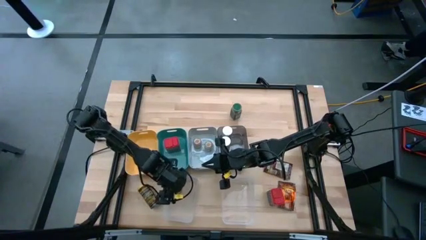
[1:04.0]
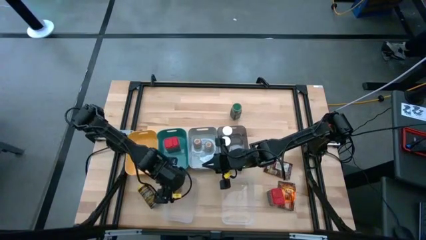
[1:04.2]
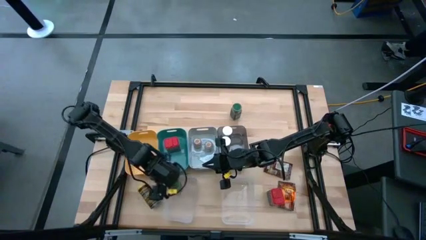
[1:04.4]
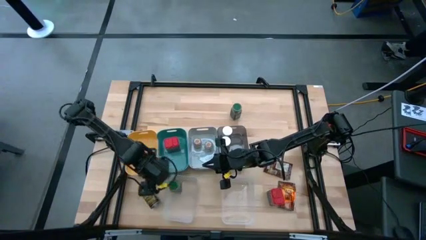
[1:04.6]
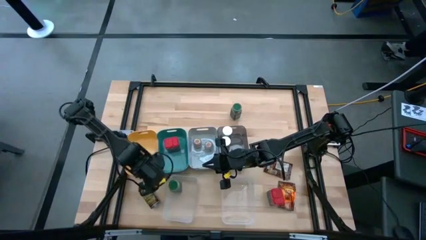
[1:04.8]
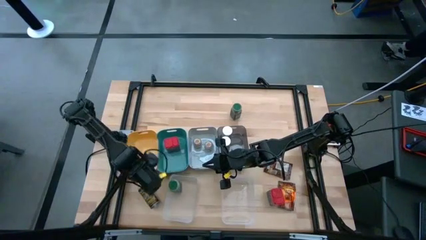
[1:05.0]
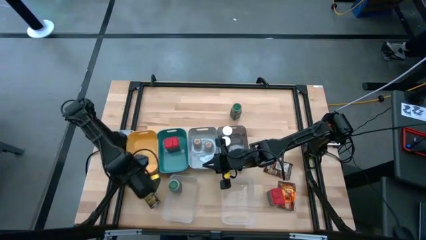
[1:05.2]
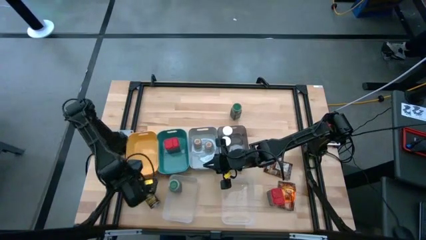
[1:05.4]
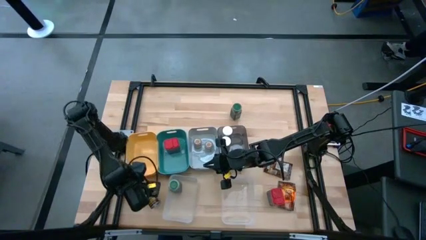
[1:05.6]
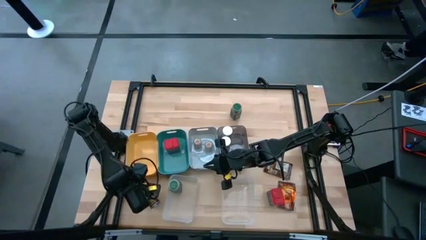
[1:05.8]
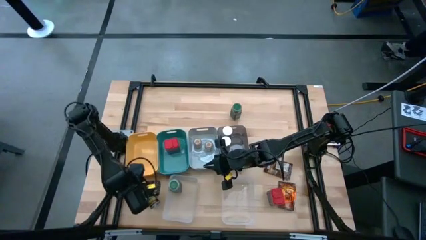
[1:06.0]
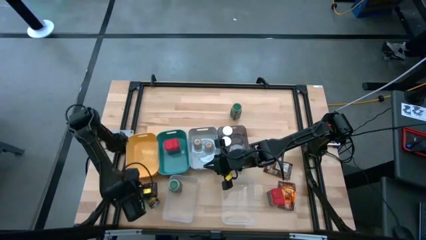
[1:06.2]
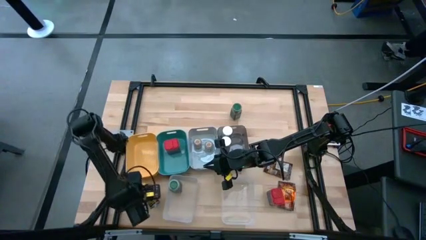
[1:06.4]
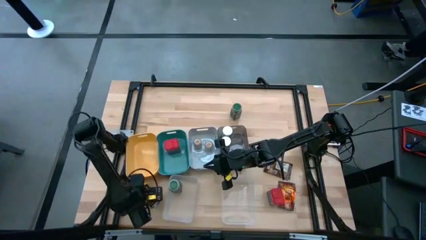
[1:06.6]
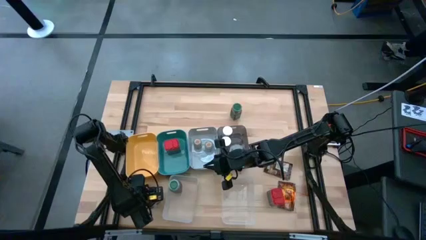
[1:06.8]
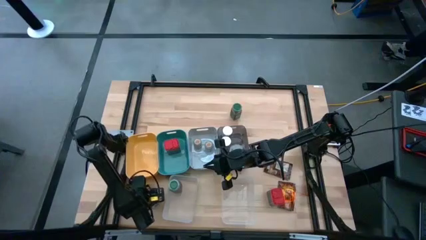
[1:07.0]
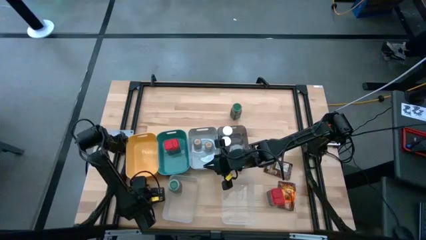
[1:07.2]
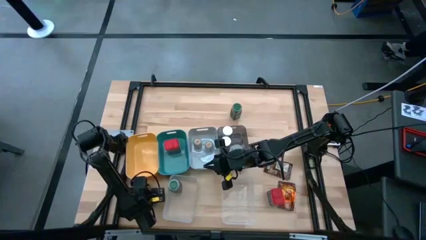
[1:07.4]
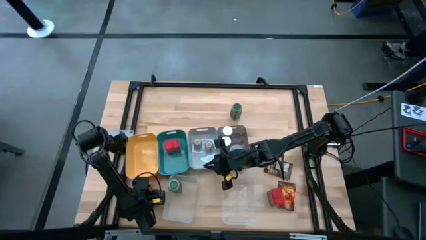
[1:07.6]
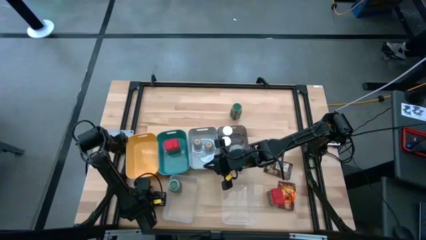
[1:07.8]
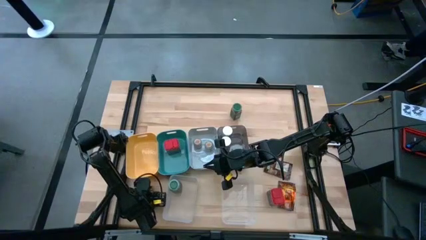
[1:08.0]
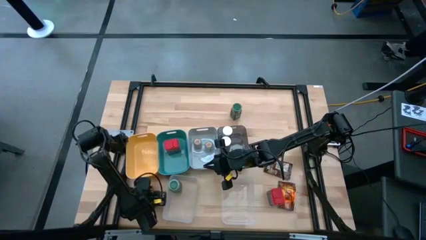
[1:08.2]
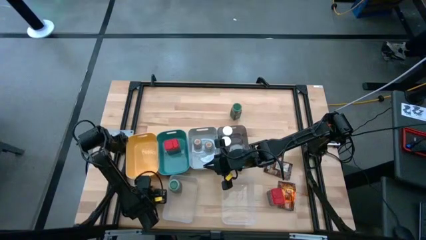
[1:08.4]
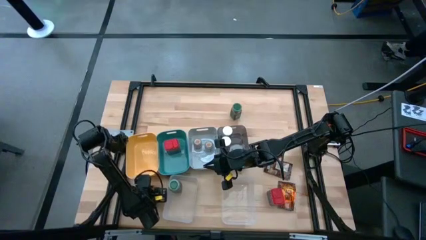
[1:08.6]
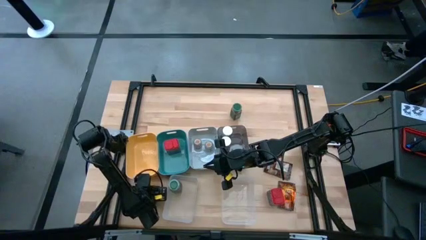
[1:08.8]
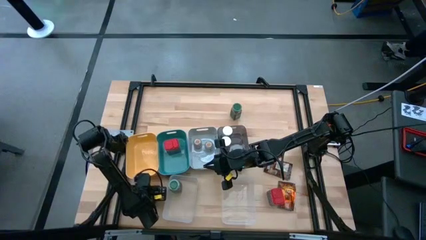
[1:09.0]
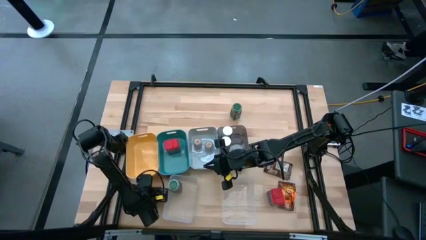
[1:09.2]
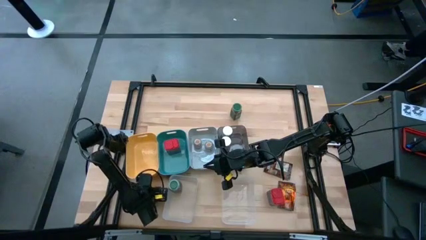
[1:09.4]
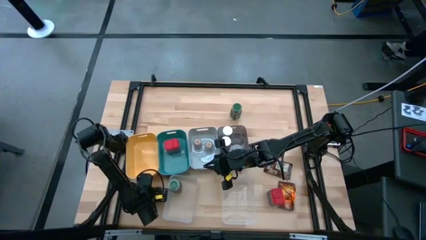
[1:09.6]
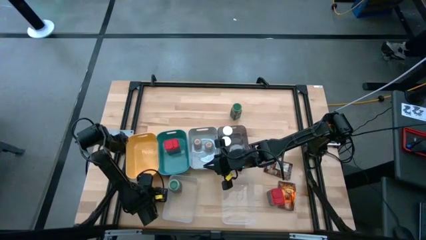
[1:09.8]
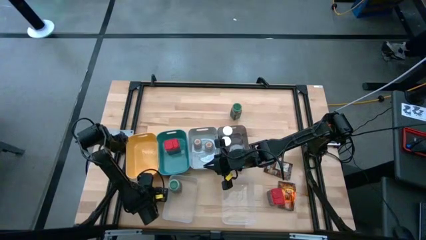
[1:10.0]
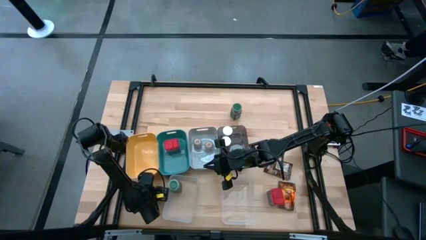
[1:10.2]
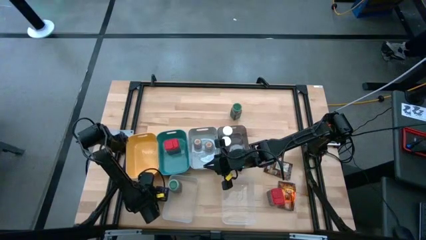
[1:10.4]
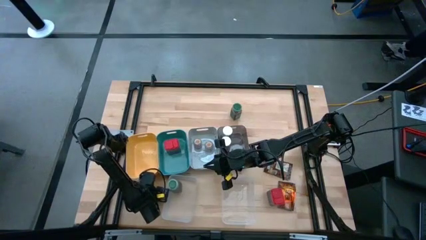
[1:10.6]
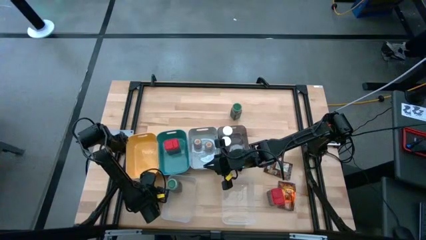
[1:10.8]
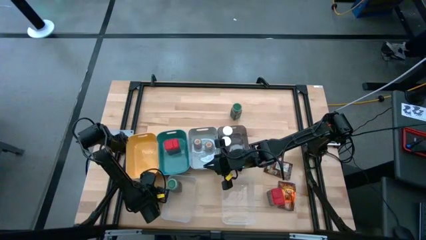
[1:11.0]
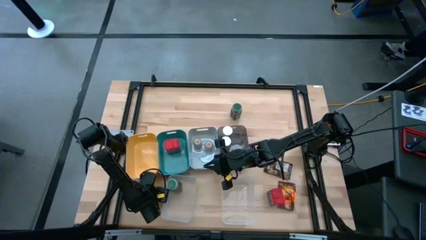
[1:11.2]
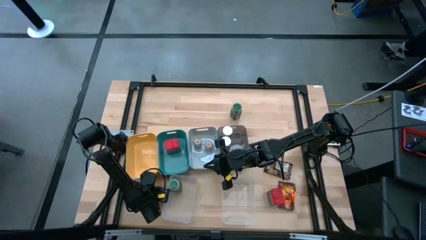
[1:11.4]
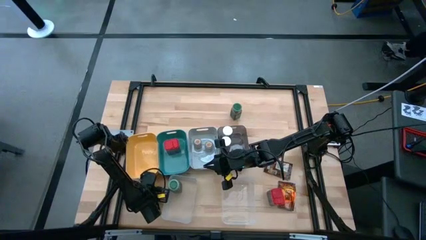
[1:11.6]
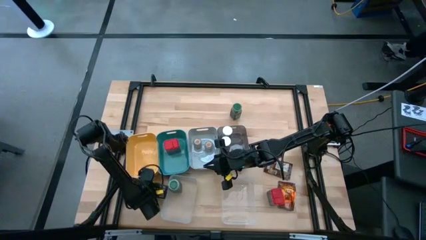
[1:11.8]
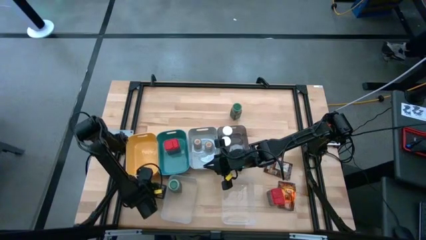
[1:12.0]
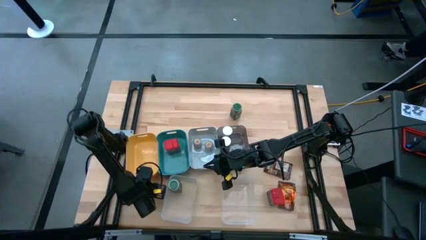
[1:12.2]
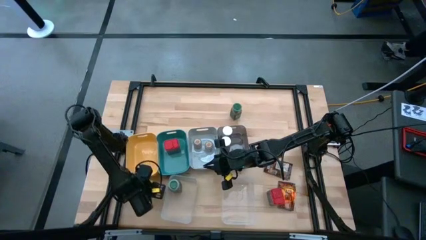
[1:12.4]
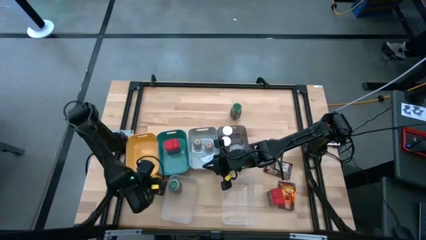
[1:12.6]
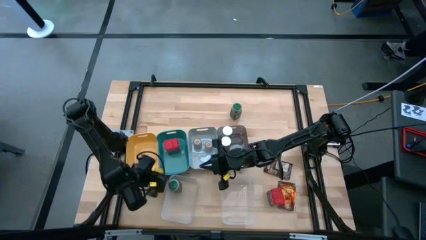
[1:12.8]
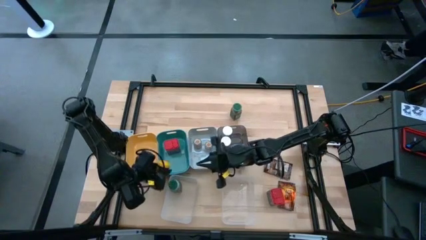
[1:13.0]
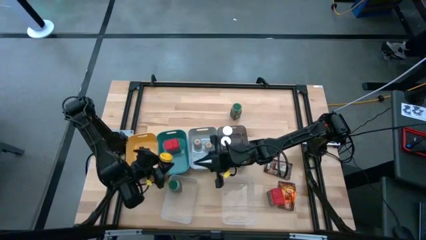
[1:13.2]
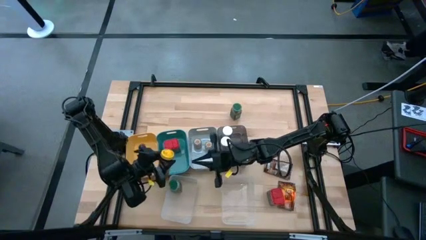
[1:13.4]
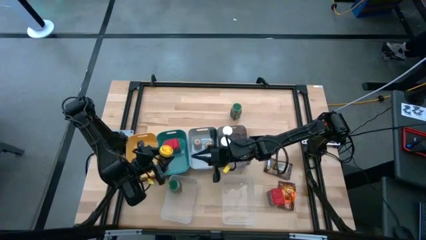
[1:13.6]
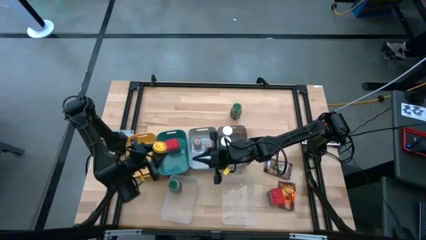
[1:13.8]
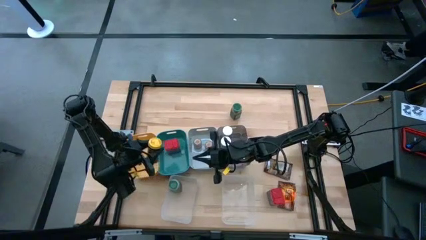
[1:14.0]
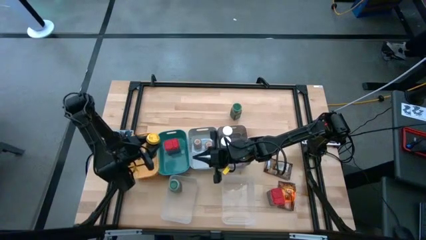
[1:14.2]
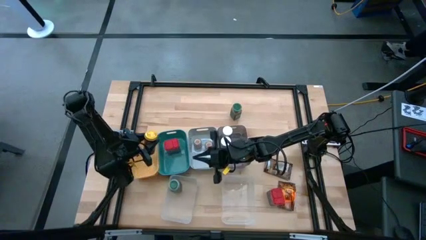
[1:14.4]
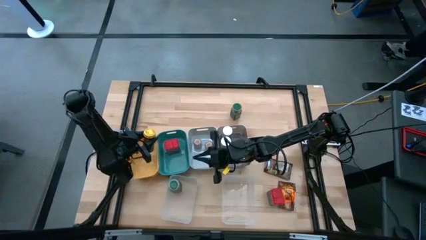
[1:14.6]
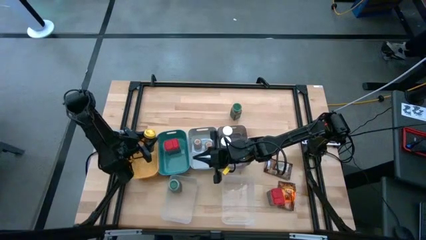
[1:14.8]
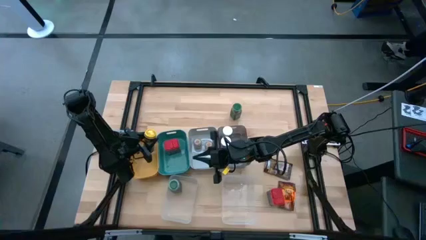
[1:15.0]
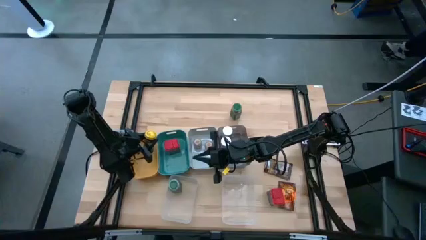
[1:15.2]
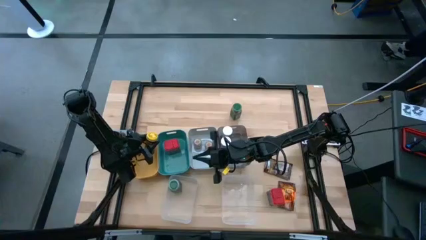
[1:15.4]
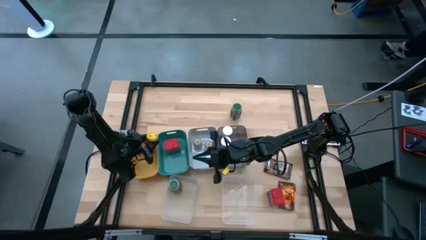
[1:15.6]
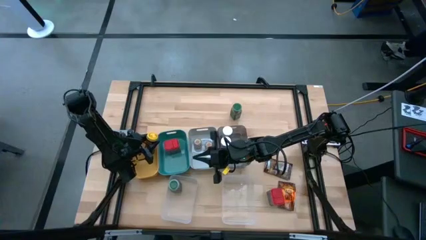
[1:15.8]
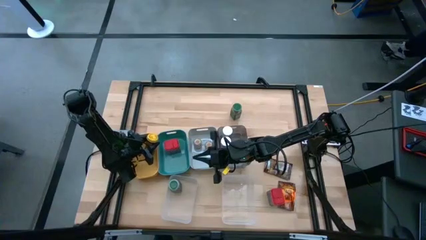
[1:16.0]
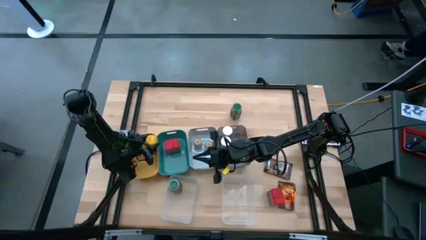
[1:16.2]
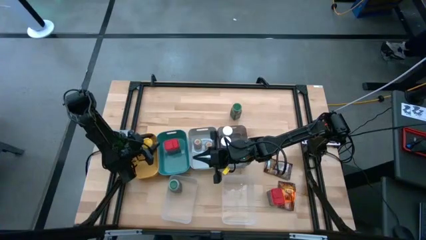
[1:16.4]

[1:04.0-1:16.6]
Task: Sort spices by type
Put the yellow spice seasoning into the yellow bin

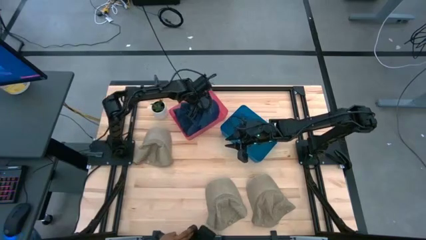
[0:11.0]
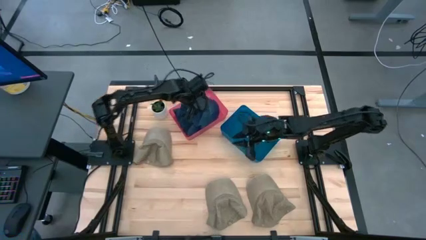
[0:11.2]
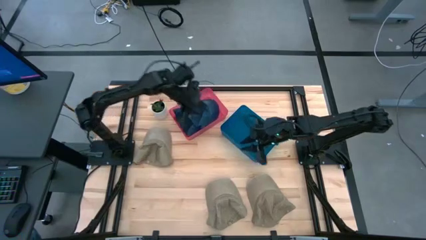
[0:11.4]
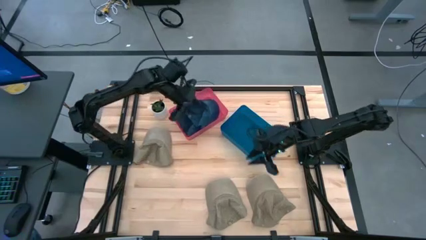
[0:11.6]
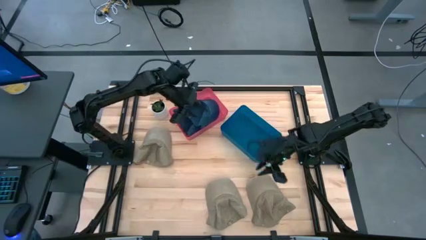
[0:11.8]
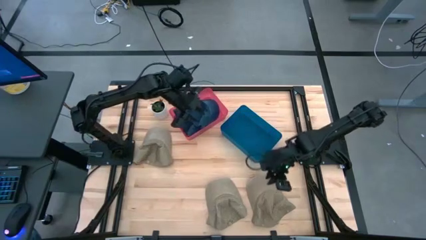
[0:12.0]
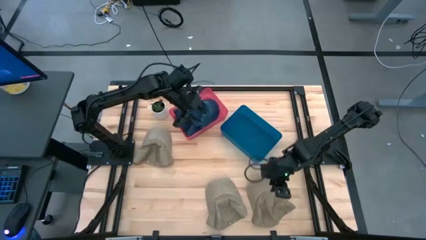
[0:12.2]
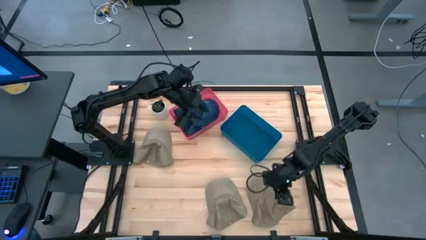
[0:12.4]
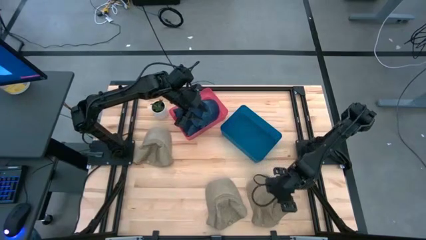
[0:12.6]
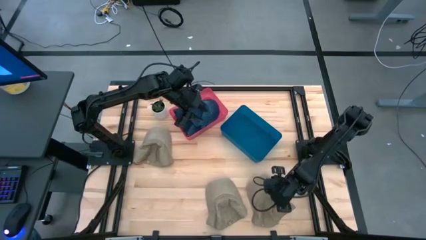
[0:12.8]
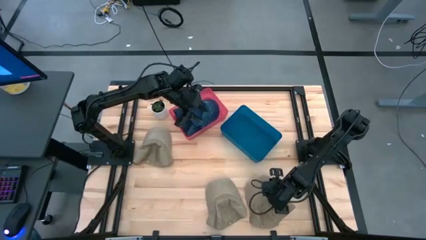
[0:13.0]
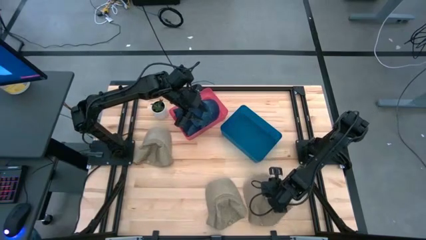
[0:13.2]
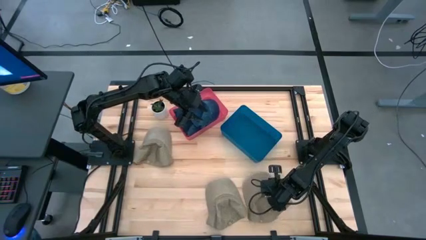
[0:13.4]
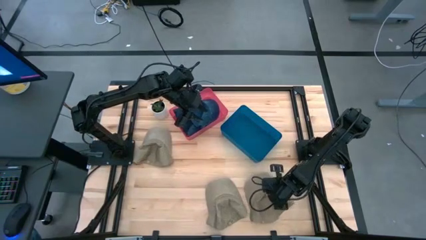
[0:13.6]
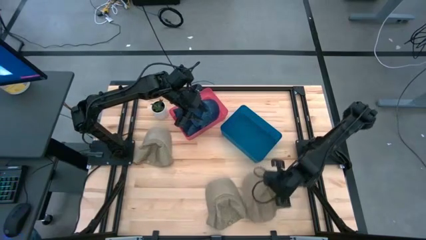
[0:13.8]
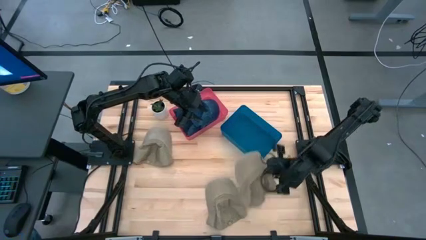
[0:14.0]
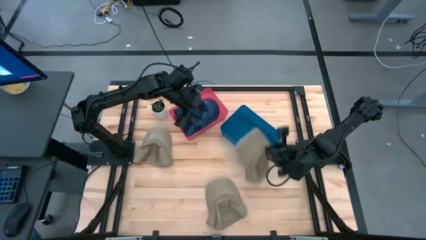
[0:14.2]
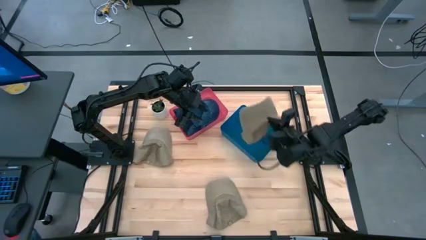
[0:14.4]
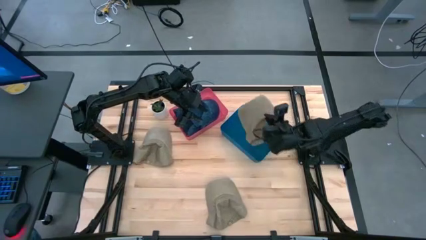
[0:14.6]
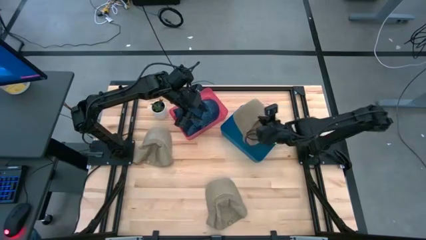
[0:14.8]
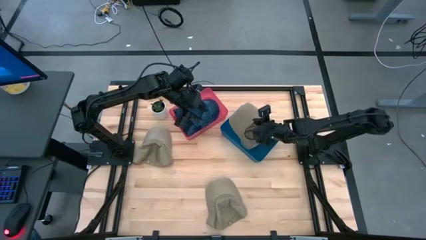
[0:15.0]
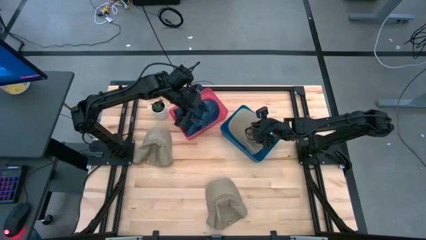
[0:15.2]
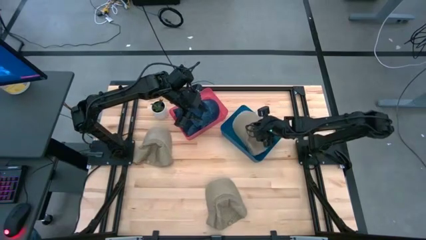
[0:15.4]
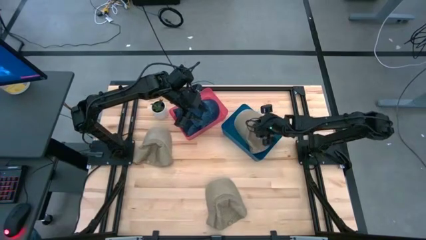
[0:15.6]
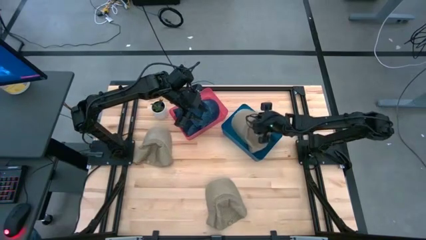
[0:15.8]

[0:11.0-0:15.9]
Task: Pick & Place hat
Put the bottom right brown cap into the blue bin
